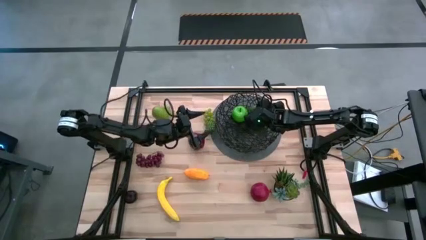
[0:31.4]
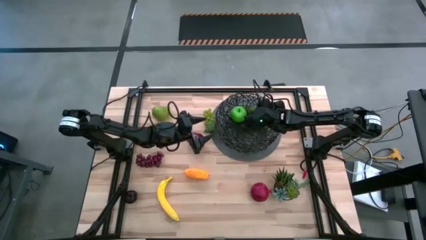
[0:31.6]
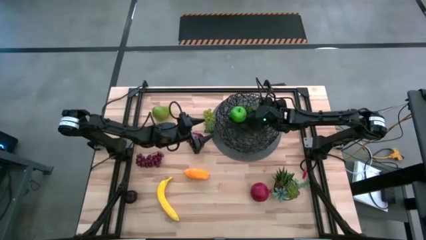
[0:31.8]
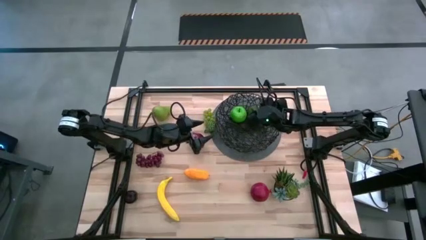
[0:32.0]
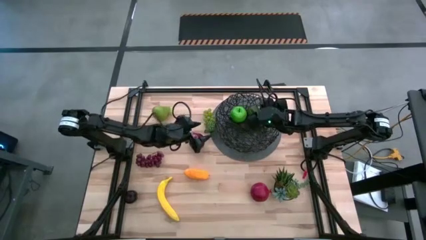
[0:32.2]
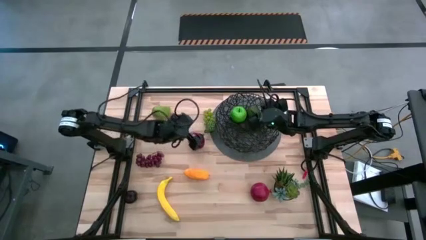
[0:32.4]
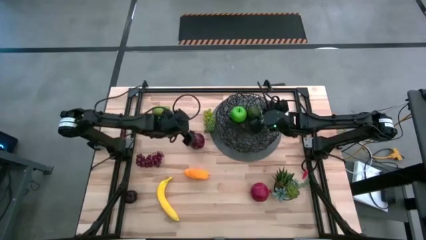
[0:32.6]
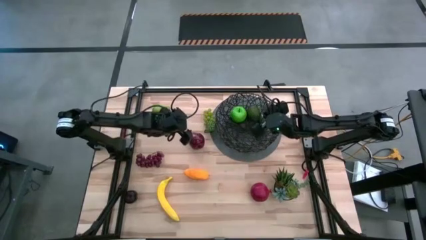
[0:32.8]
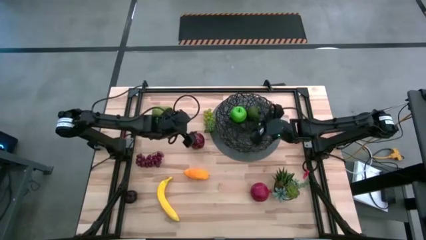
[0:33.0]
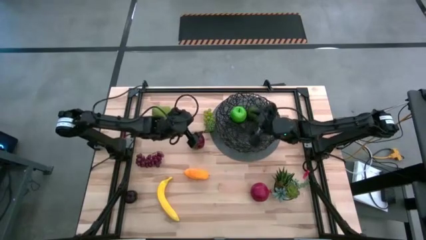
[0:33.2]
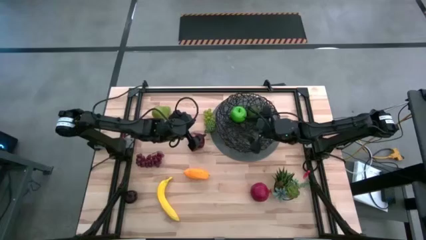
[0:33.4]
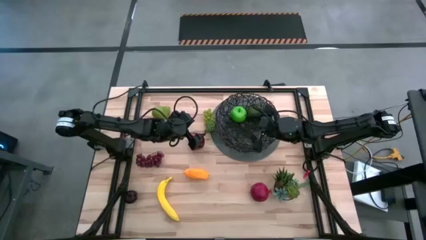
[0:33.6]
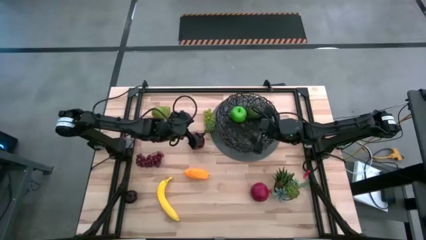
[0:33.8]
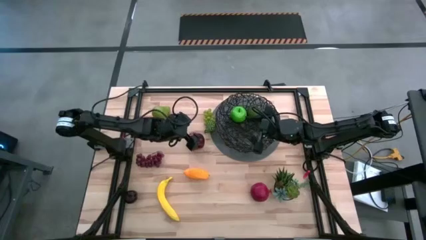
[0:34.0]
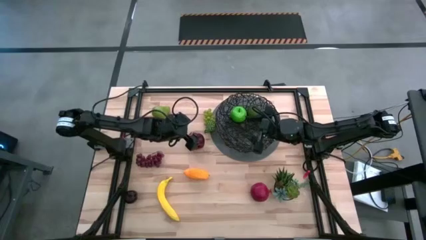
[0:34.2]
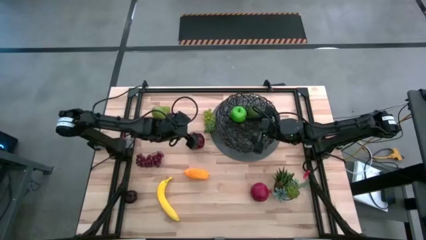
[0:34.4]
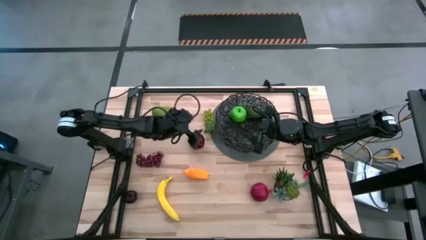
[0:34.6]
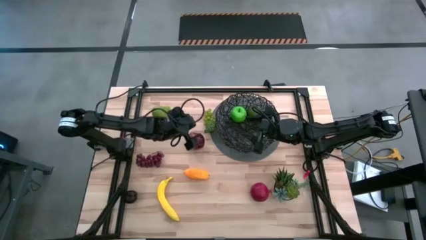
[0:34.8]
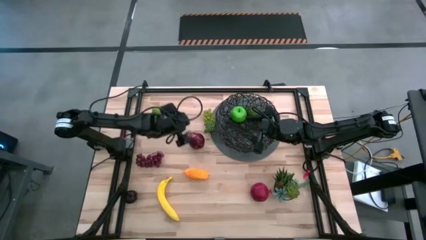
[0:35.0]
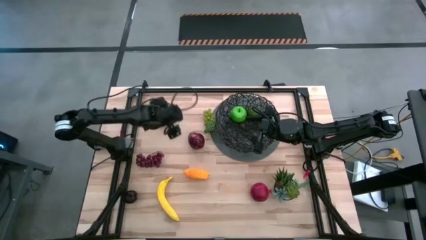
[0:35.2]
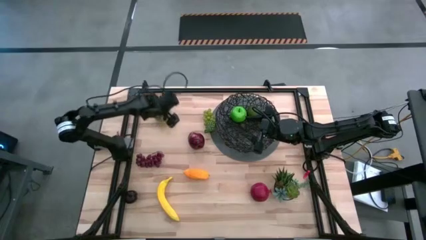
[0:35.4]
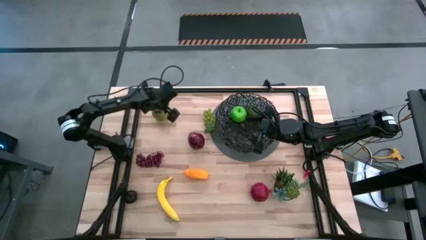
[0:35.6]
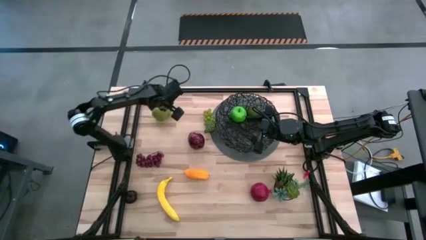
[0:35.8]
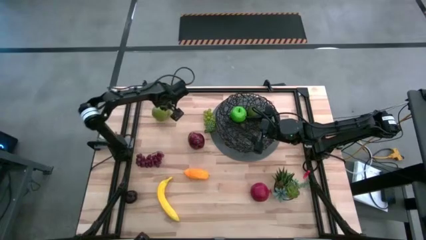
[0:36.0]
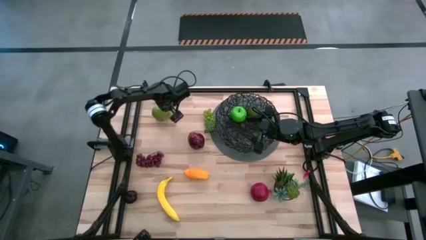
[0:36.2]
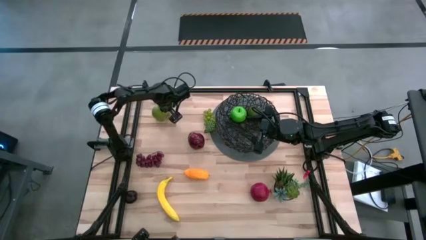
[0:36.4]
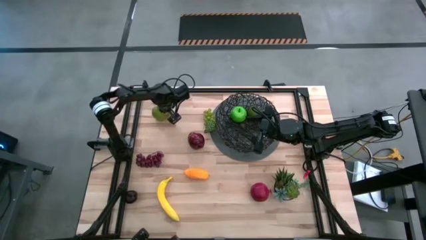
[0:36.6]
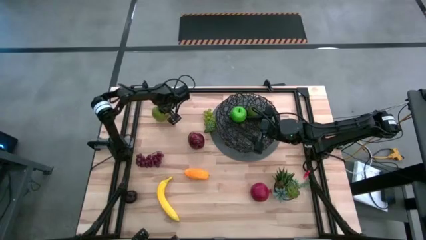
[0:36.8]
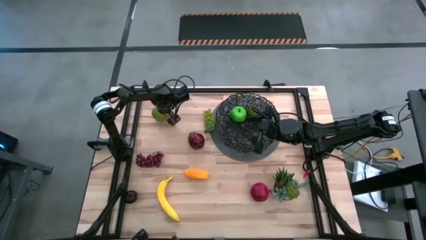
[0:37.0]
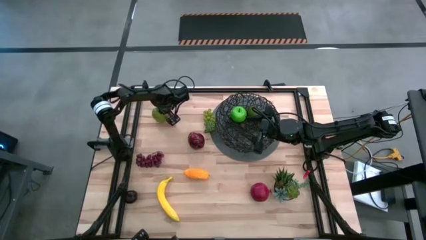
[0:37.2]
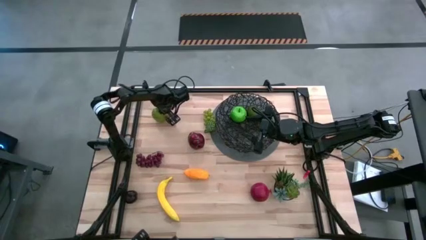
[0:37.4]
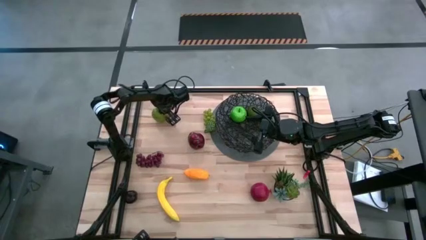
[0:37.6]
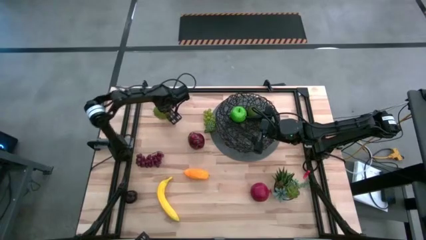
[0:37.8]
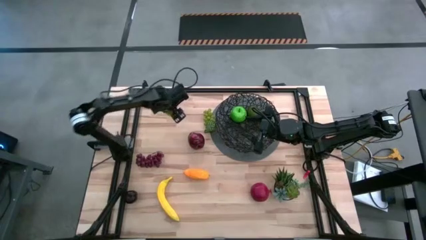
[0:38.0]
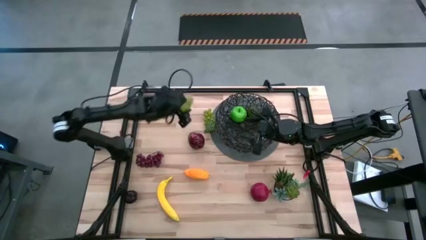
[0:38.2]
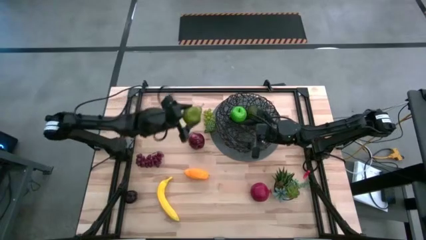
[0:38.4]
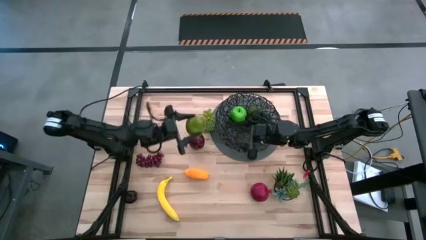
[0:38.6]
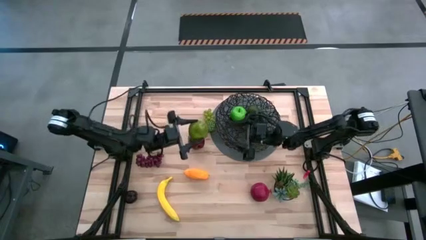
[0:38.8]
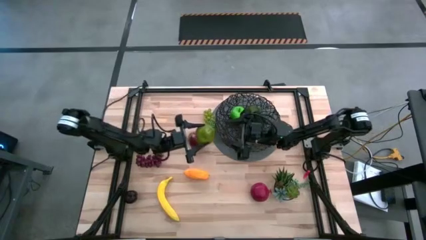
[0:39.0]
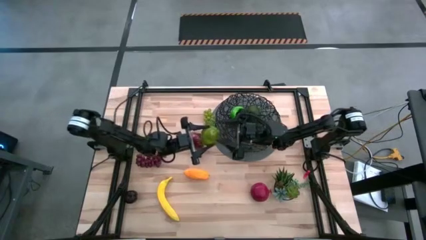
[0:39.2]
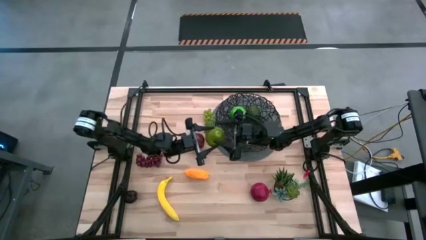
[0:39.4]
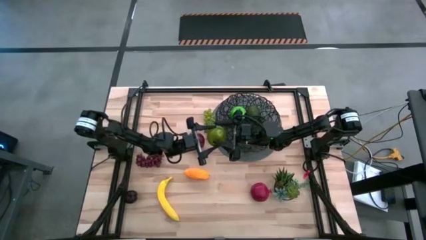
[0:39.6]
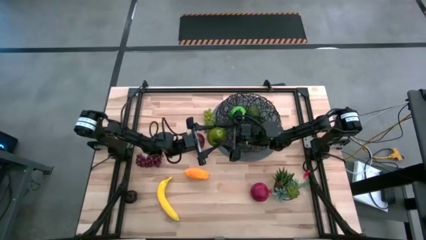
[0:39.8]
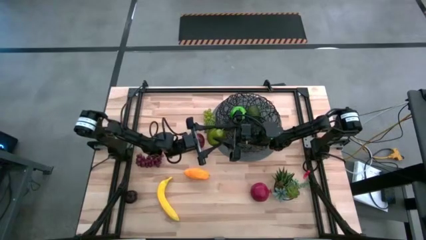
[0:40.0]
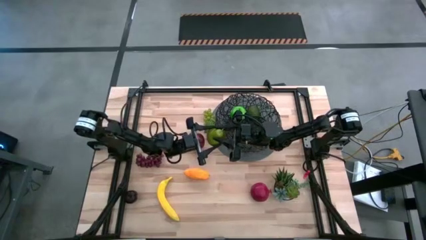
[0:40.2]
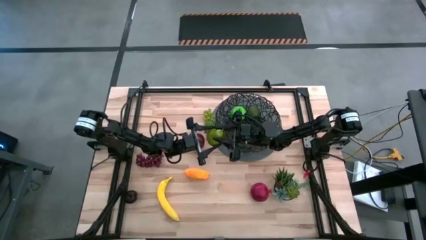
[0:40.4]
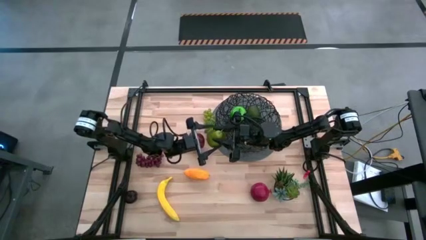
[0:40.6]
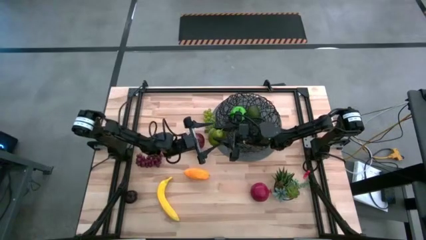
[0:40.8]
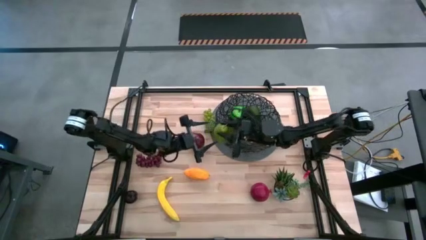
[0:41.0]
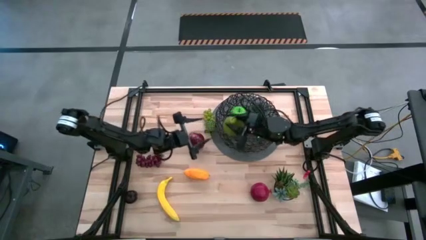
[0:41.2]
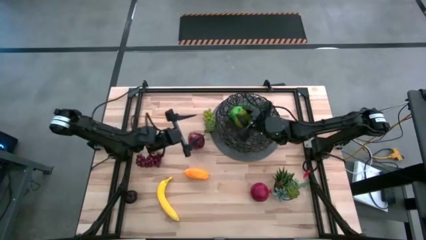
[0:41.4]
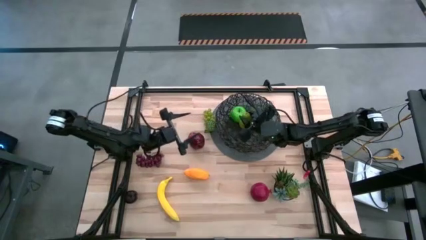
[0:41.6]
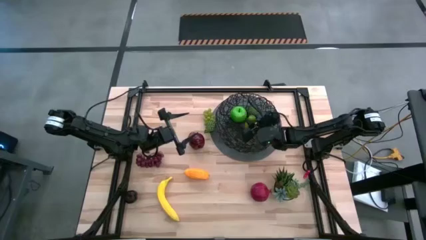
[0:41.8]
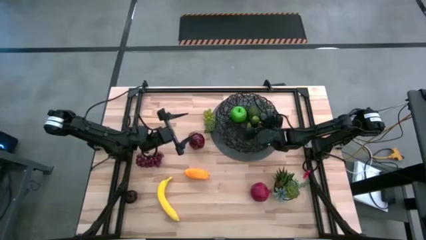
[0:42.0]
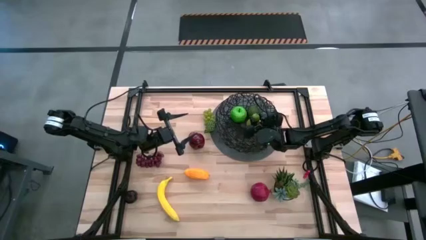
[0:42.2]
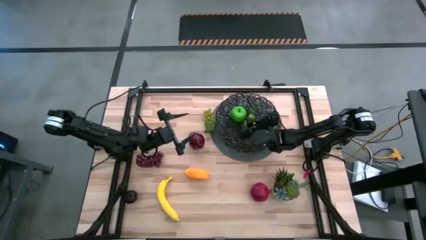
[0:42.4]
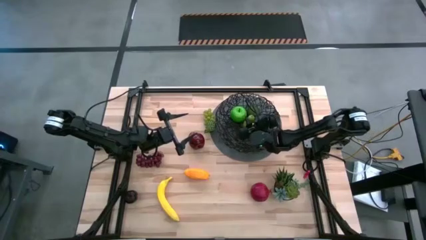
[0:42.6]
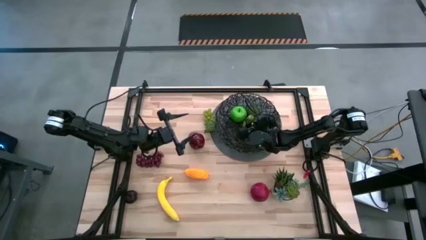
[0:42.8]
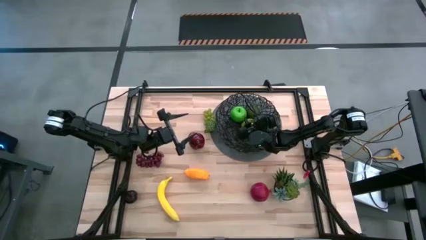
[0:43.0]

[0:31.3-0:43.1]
Task: Build produce basket
Put the pear into the wire basket
